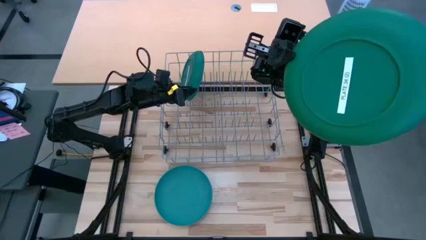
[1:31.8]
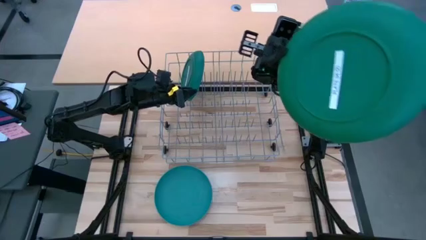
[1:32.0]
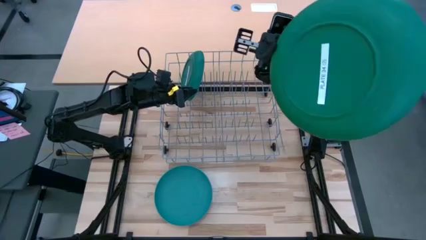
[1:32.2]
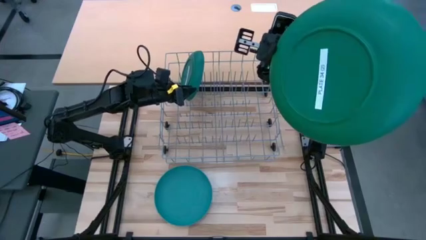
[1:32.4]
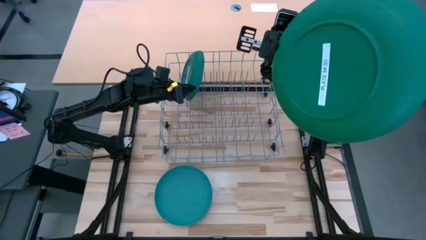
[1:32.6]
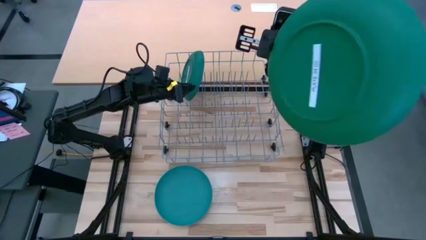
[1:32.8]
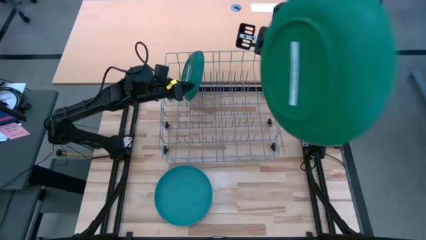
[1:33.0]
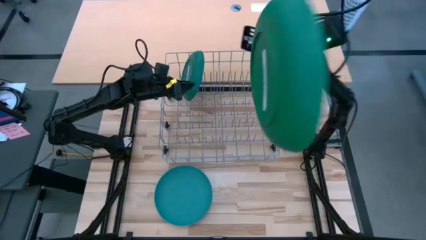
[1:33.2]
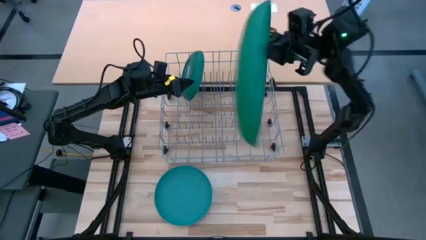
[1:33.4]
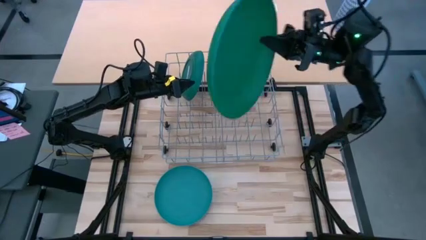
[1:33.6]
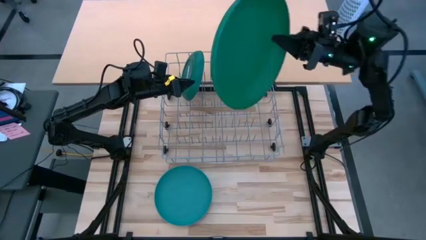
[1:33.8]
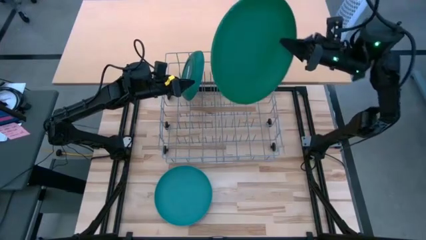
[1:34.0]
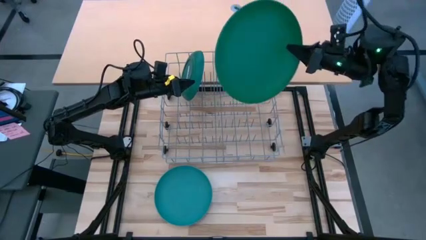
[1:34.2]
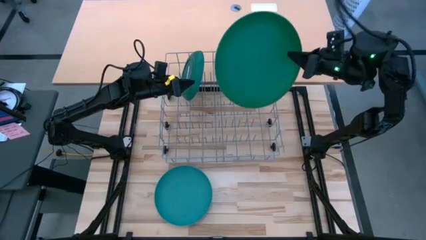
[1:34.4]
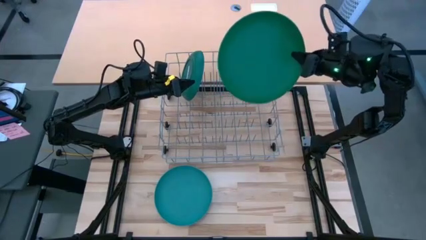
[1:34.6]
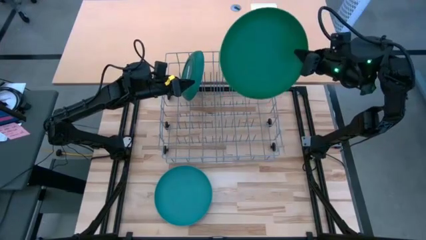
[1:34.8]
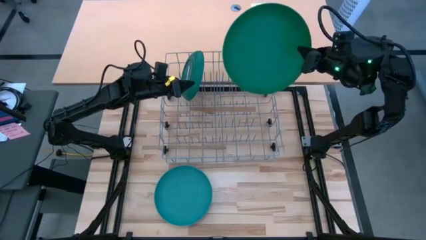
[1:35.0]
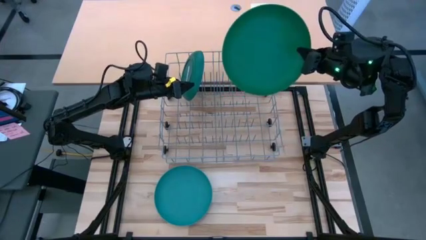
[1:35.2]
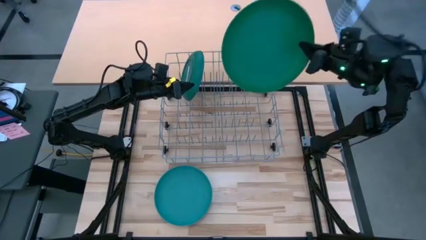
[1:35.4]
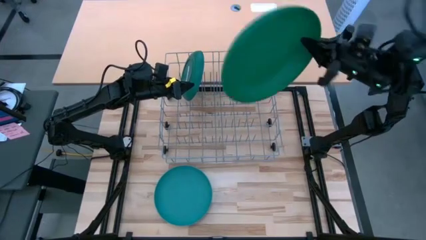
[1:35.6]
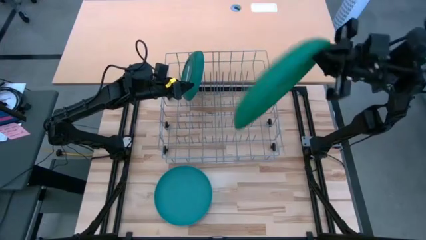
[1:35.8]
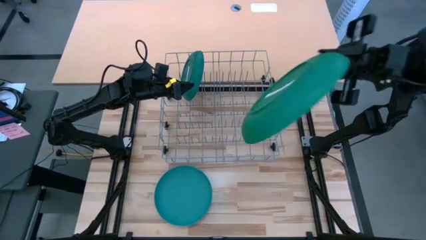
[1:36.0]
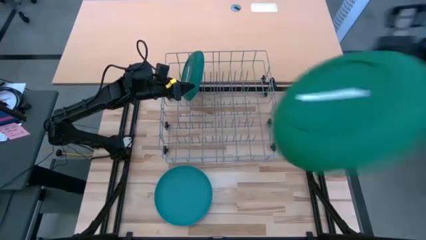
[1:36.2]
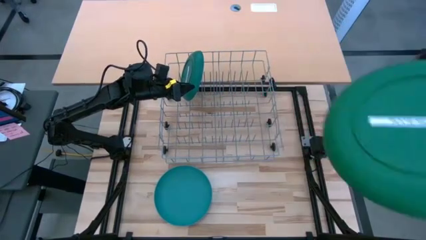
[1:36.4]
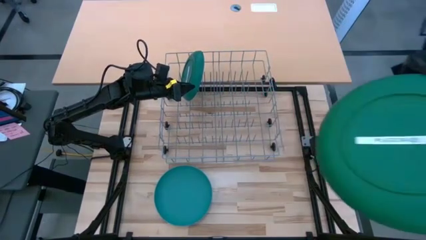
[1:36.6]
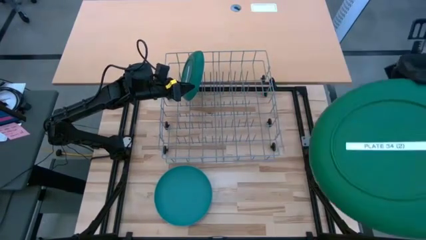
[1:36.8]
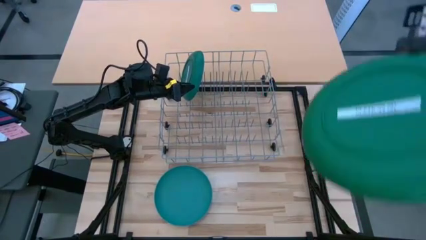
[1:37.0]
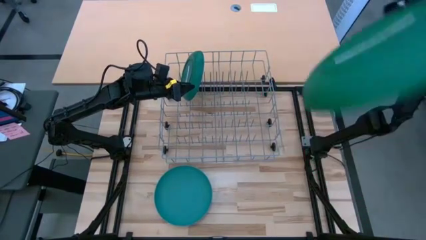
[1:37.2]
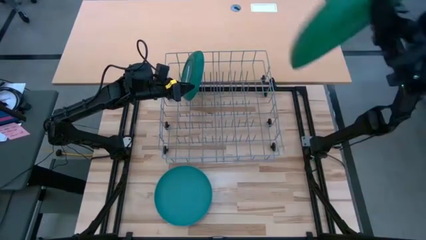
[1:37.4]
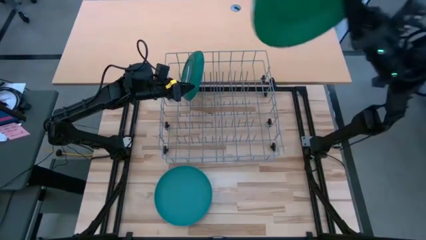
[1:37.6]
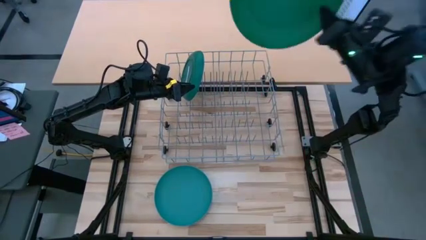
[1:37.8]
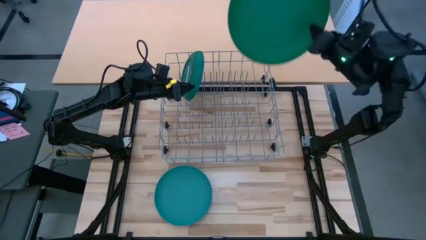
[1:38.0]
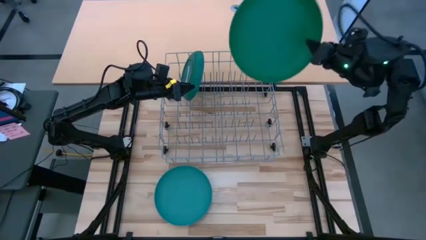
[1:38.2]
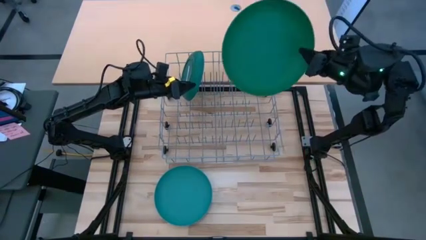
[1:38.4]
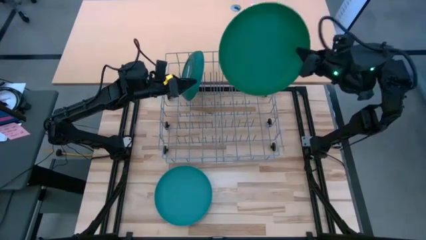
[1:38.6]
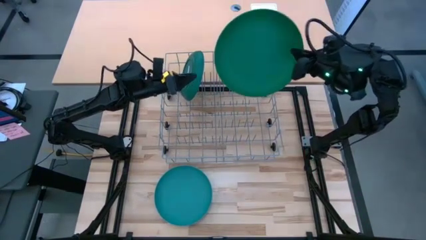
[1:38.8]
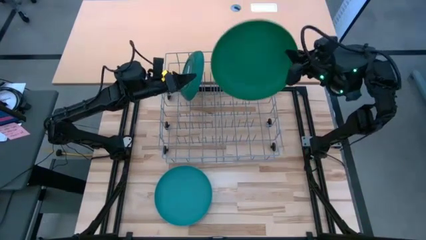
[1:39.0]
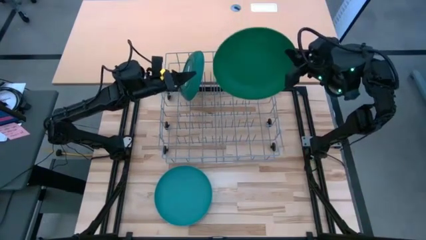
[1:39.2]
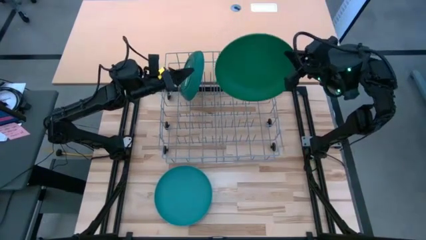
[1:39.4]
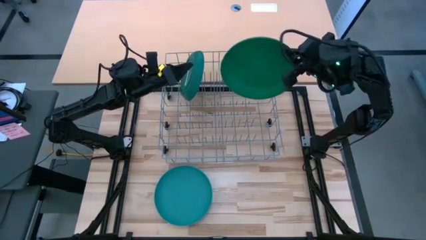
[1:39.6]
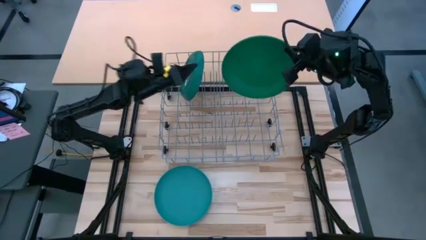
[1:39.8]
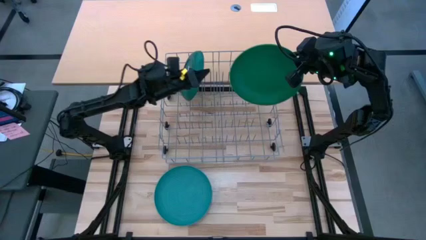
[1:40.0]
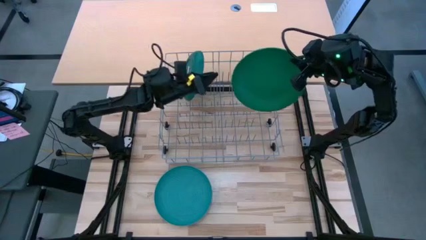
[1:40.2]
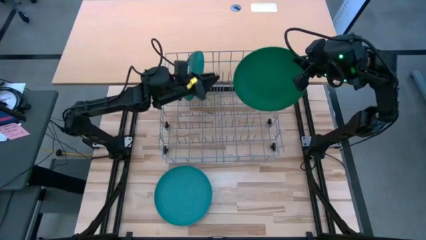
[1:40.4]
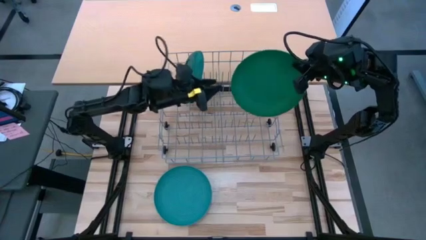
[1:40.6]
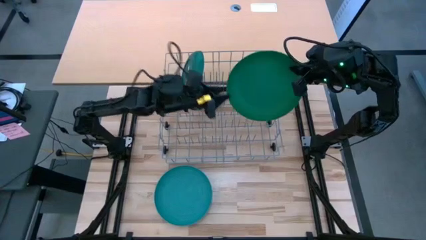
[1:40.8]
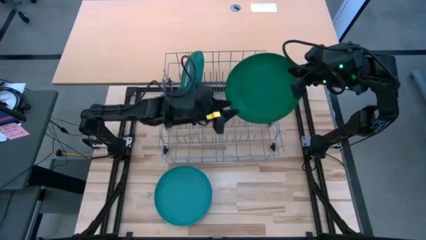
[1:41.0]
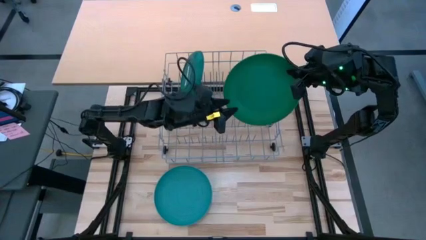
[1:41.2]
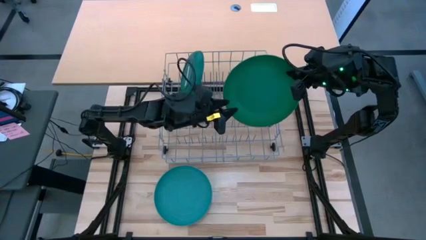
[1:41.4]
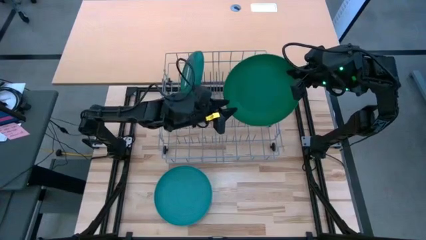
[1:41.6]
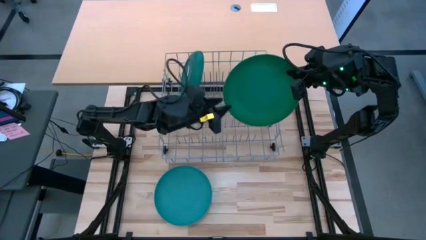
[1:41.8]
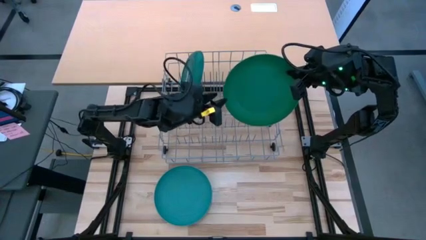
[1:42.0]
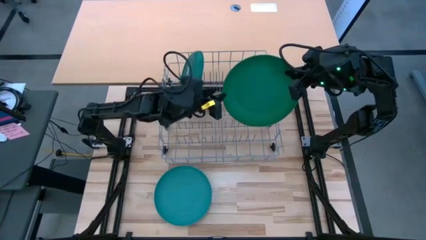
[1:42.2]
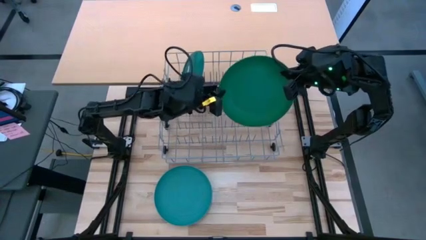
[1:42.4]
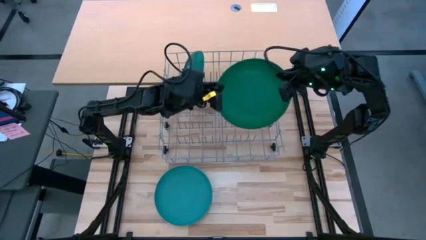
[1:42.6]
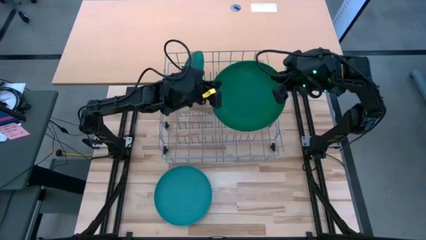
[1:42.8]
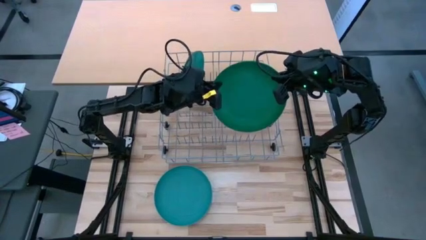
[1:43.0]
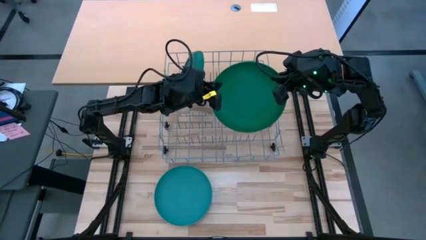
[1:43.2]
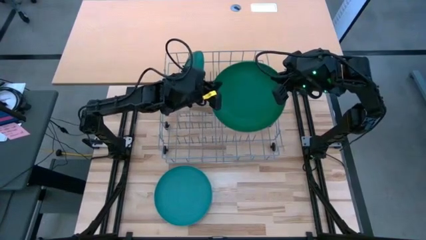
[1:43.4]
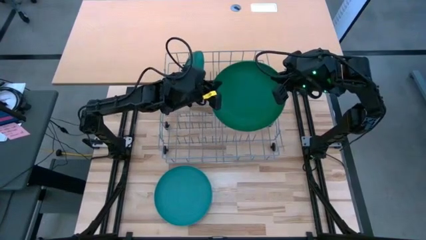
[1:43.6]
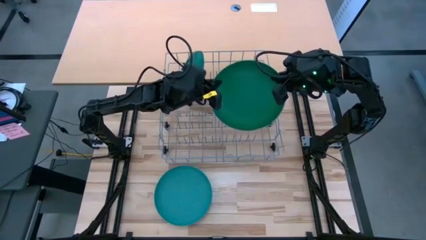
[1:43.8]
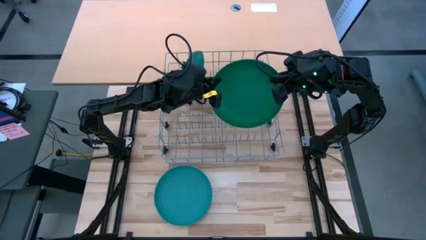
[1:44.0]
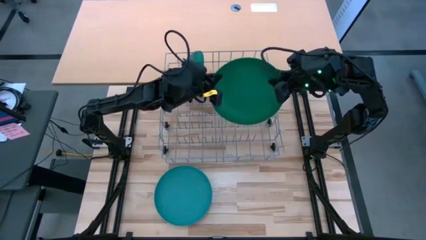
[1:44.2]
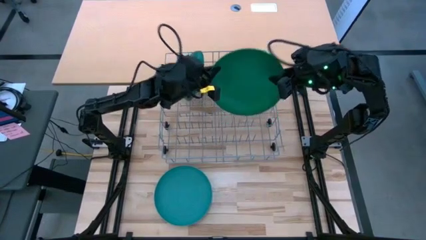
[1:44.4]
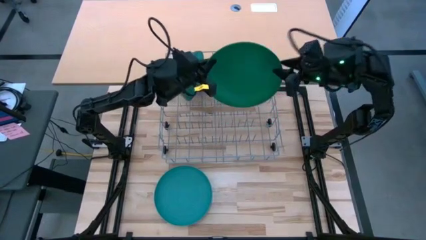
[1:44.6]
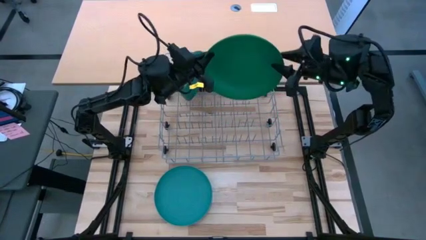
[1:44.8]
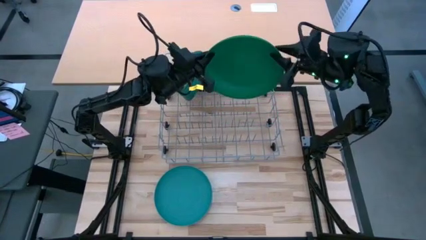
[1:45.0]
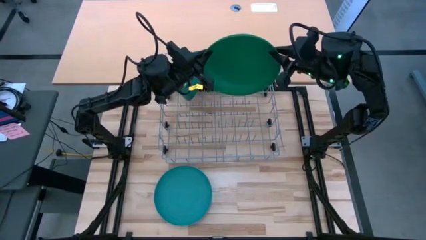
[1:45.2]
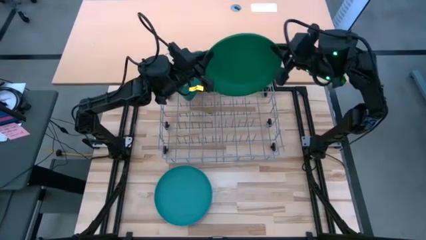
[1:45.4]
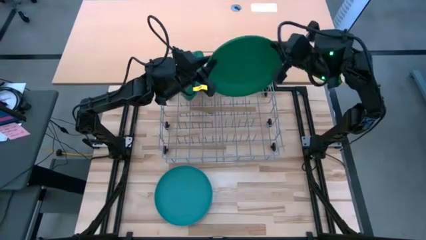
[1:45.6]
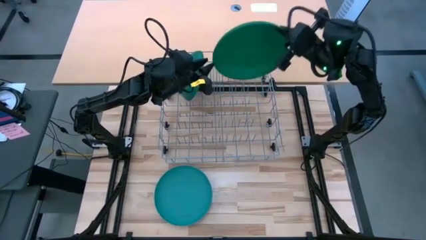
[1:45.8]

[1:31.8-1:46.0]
Task: Sort dishes
Put the green plate in the dish rack

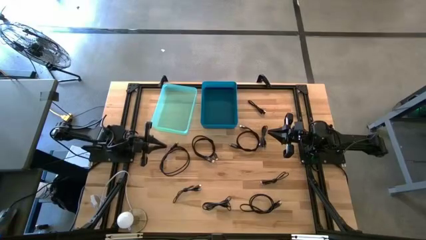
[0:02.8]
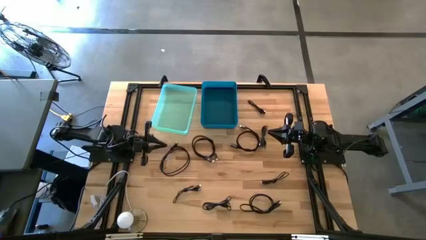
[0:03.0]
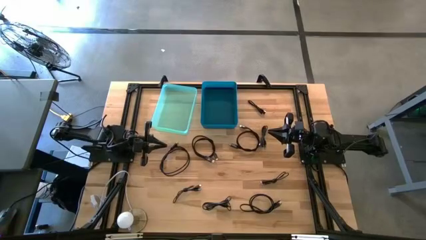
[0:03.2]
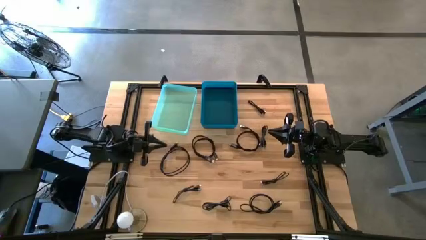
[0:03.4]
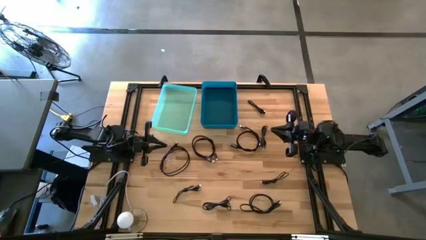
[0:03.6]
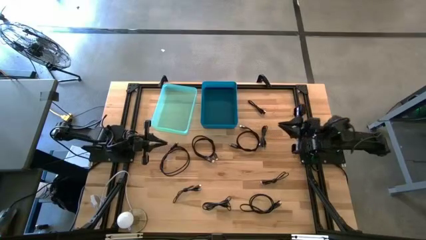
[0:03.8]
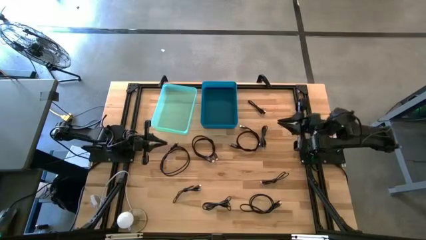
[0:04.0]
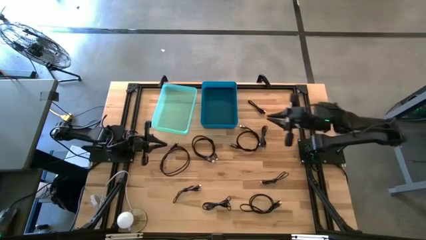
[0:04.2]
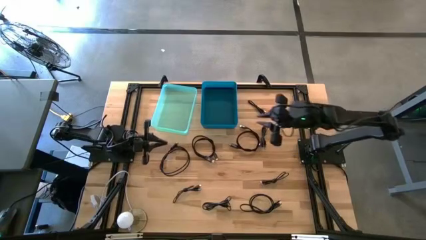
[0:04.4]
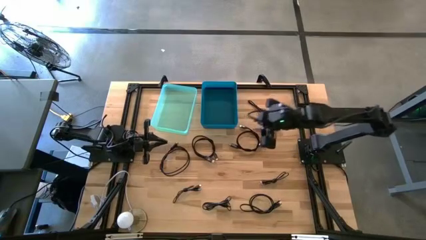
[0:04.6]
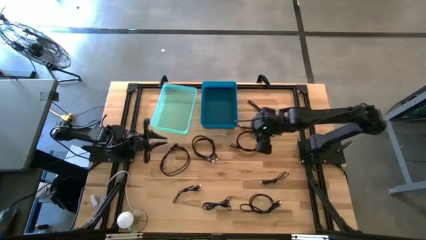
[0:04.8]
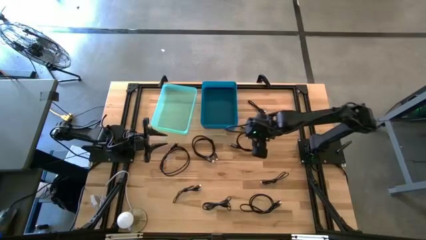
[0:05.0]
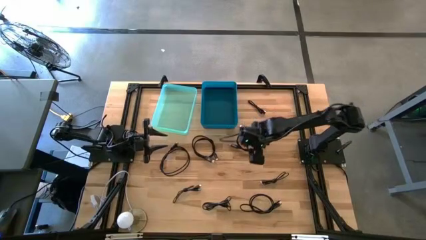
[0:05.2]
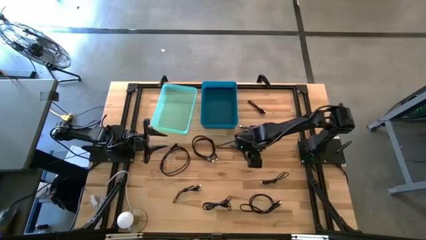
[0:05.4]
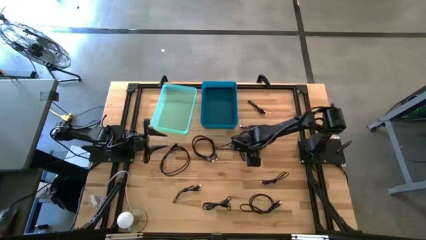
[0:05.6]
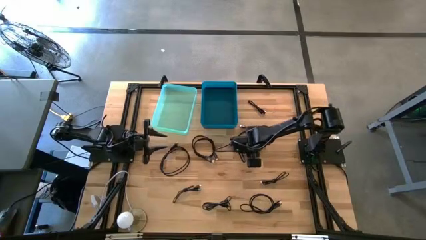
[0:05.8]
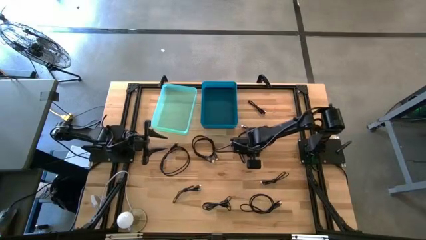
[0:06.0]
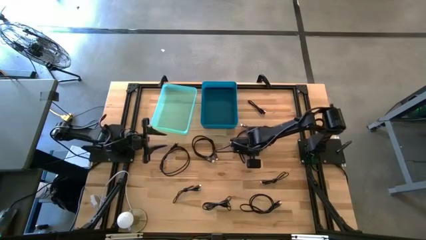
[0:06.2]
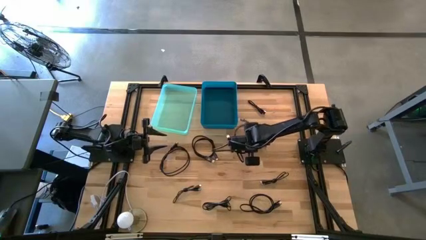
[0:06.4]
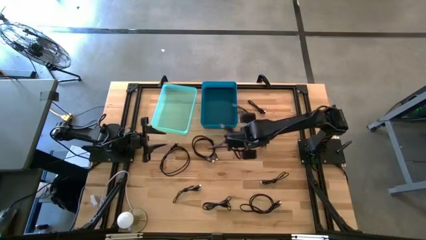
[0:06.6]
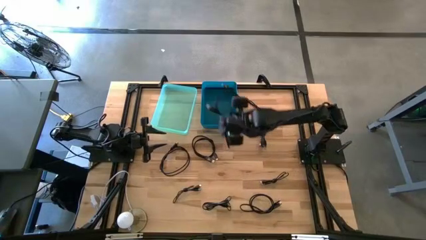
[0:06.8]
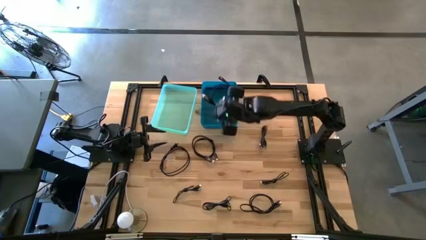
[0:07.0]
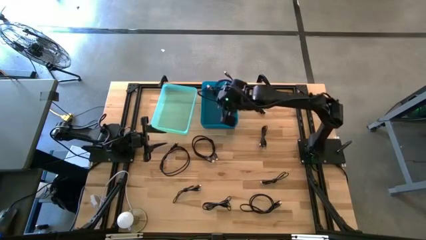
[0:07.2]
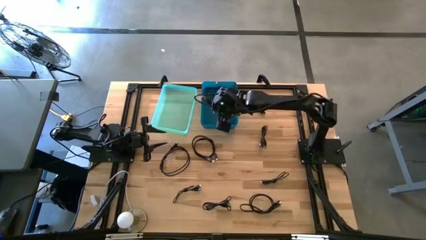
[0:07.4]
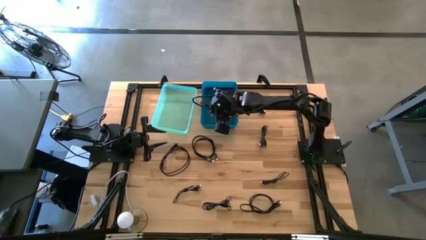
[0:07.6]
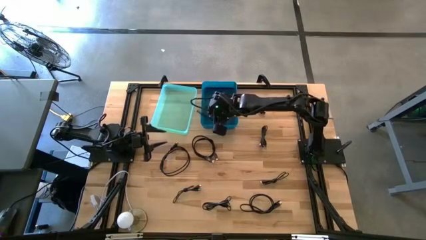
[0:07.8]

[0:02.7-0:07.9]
Task: Pick & Place USB Port
Put the black HDMI cable into the blue bin
